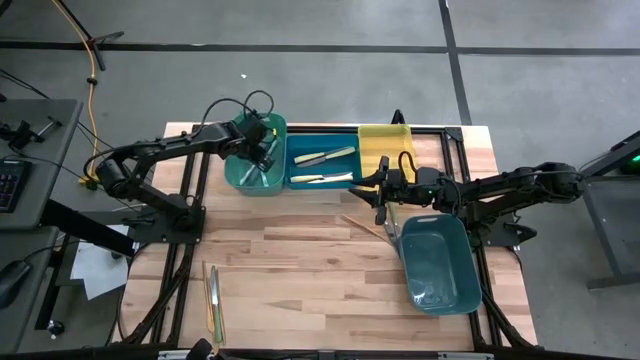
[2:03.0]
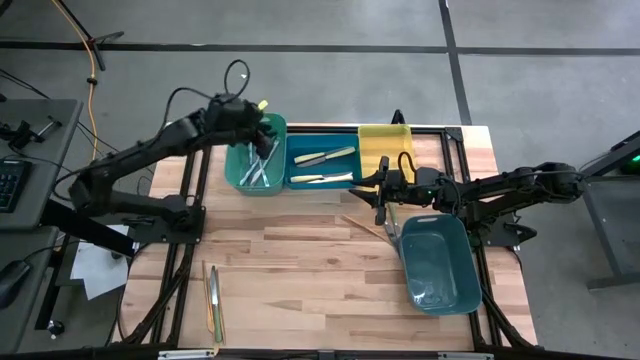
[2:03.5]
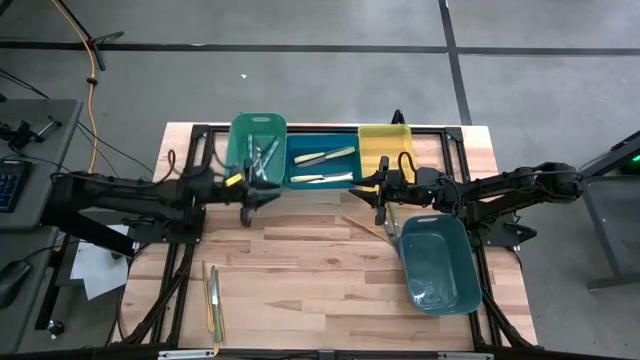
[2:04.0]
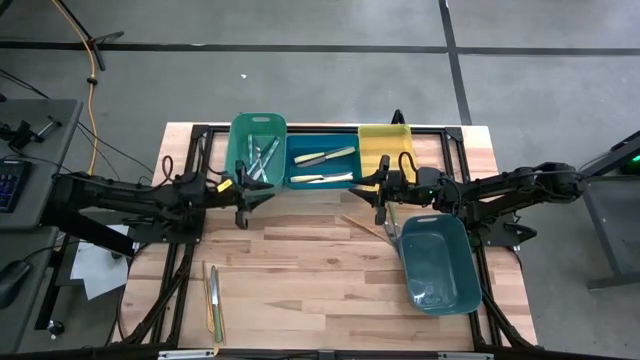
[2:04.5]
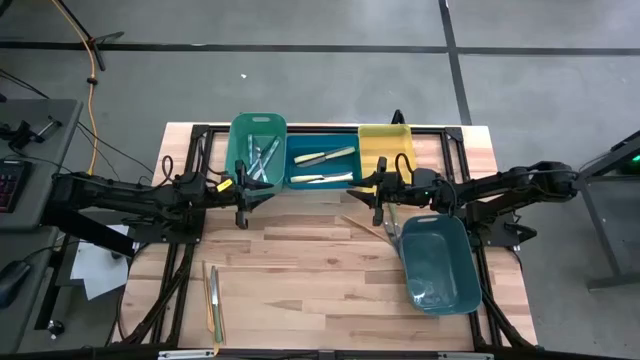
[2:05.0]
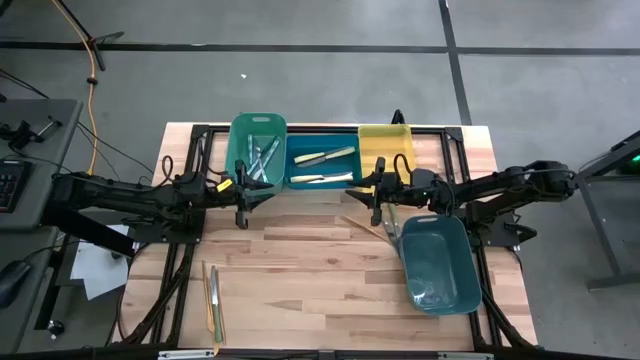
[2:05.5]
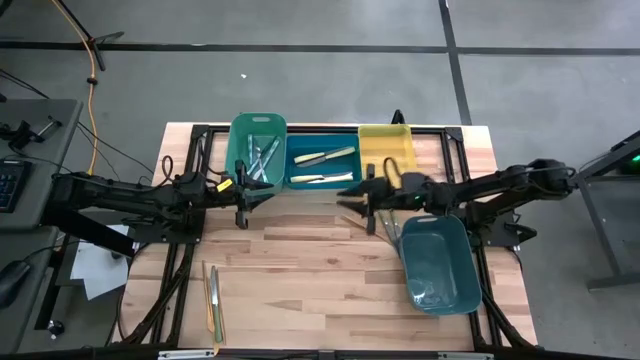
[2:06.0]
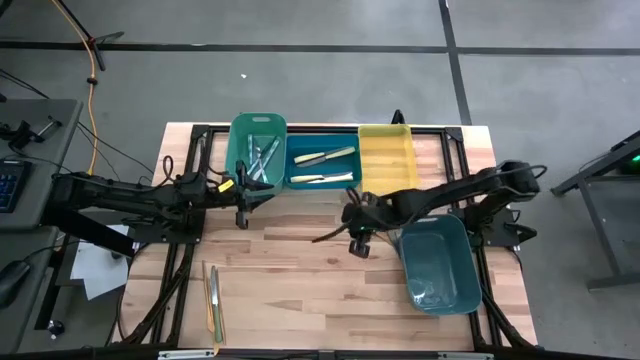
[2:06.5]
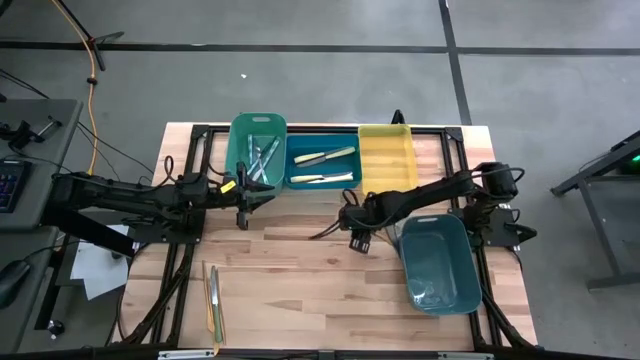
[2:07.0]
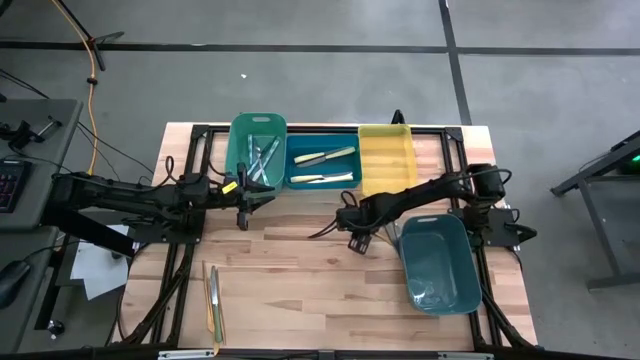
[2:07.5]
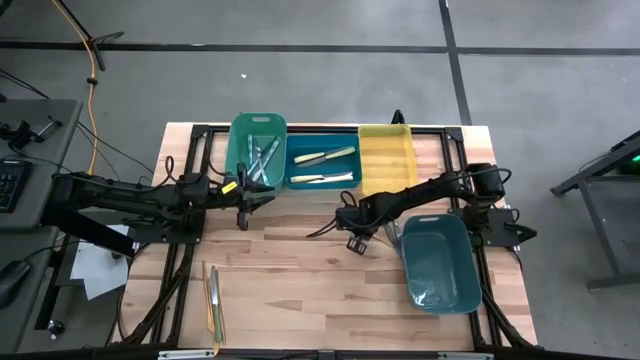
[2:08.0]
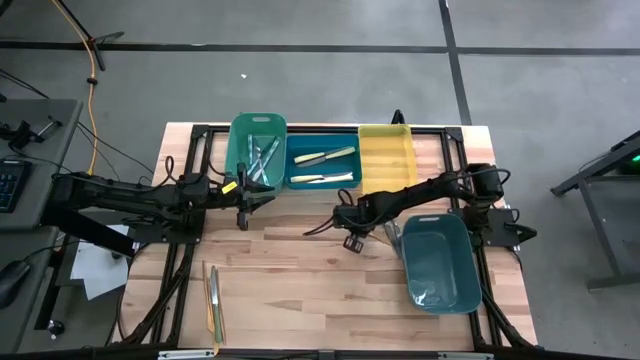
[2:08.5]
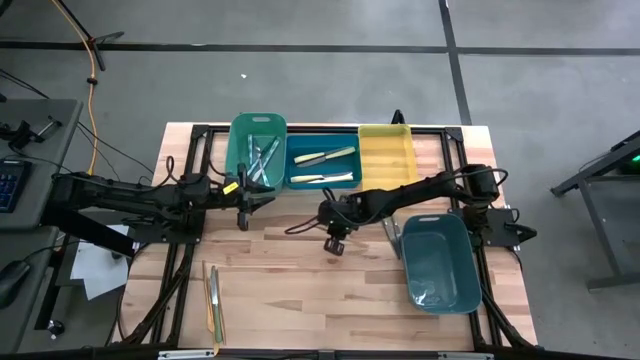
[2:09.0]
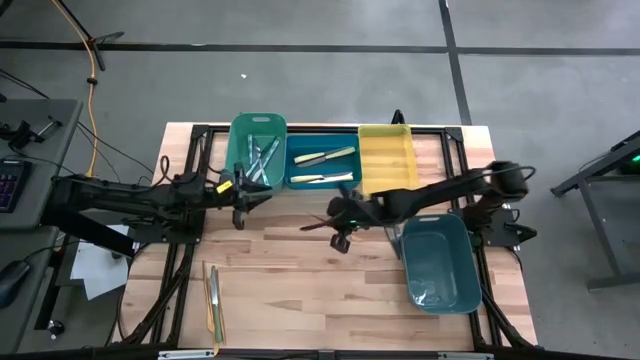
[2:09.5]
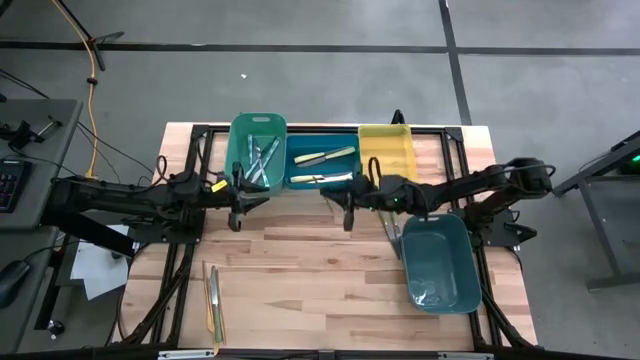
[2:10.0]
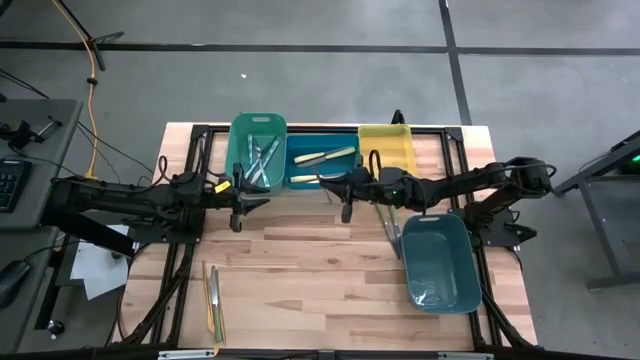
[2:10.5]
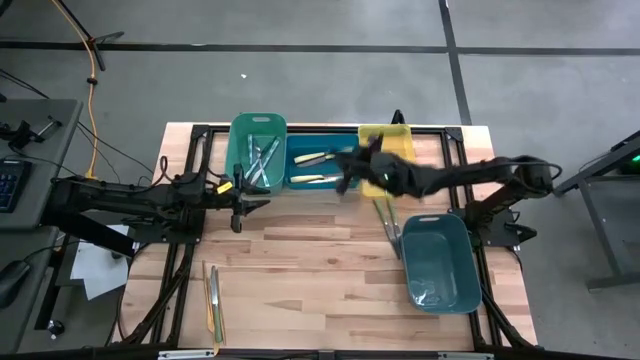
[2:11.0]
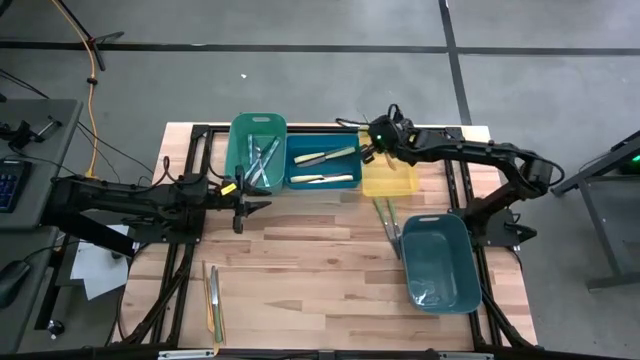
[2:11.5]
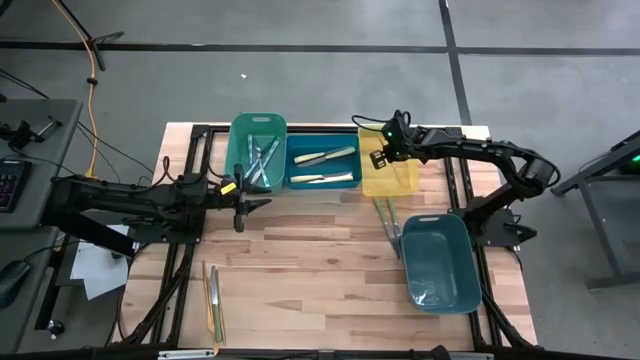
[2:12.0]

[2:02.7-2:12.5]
Task: Sort silverware by color (type)
Put the gold knife into the yellow bin

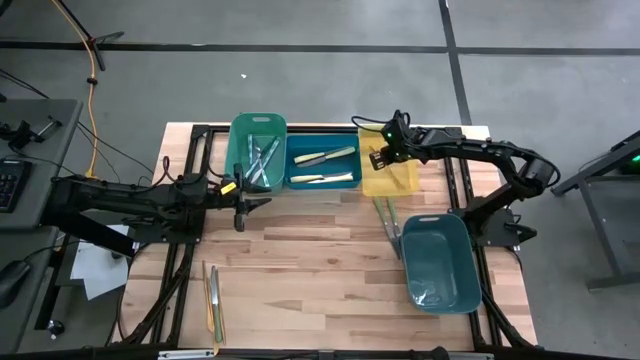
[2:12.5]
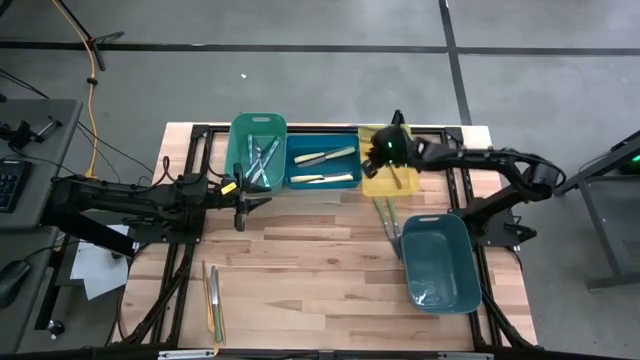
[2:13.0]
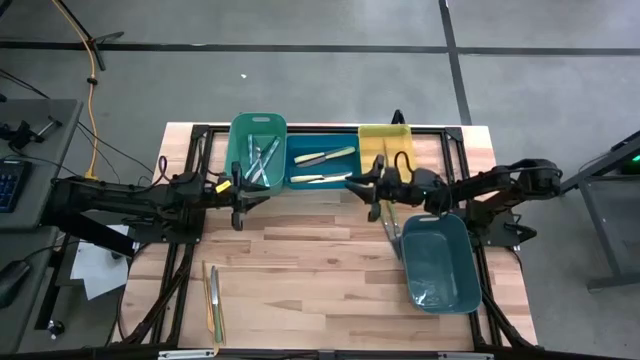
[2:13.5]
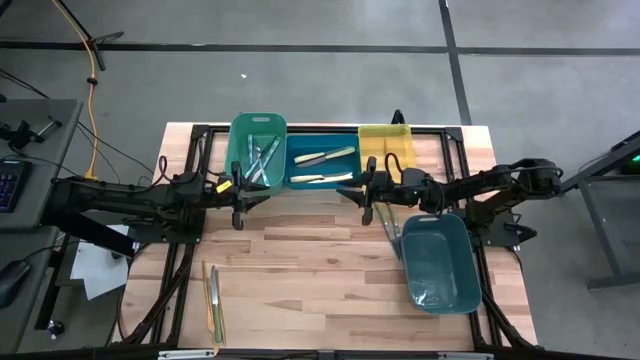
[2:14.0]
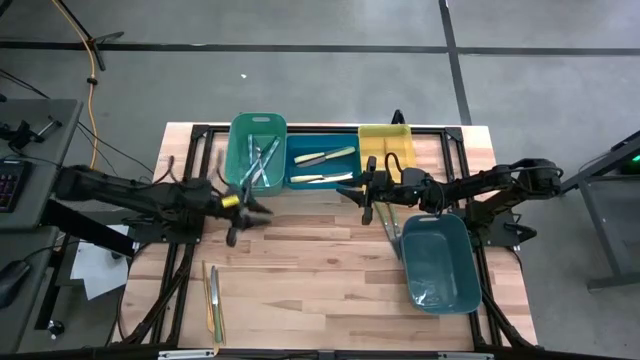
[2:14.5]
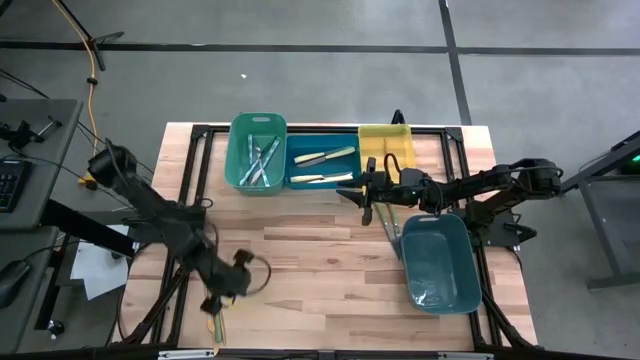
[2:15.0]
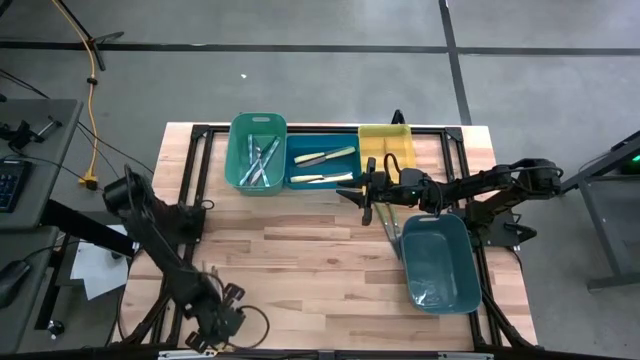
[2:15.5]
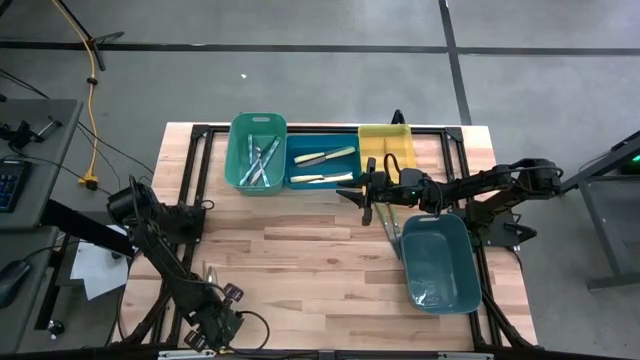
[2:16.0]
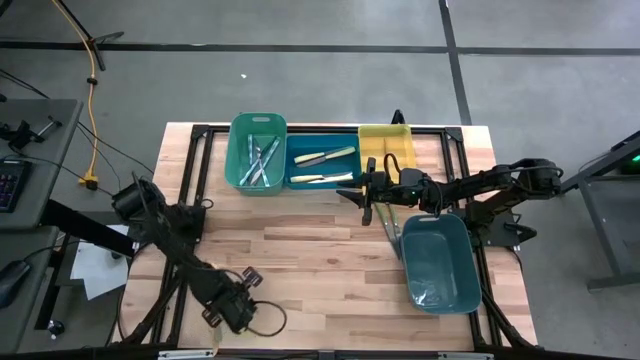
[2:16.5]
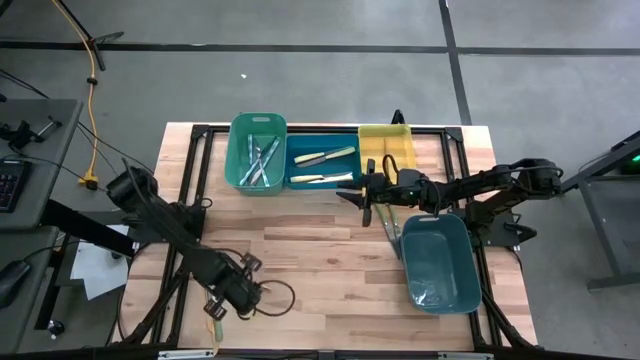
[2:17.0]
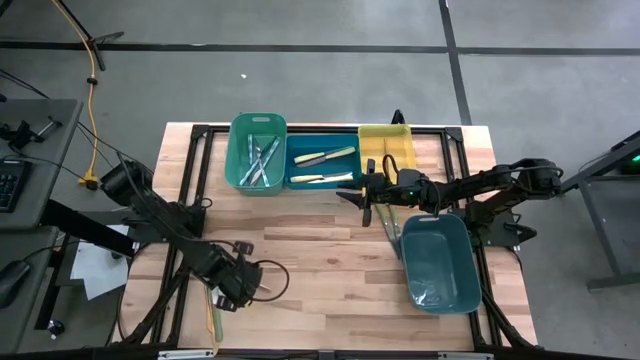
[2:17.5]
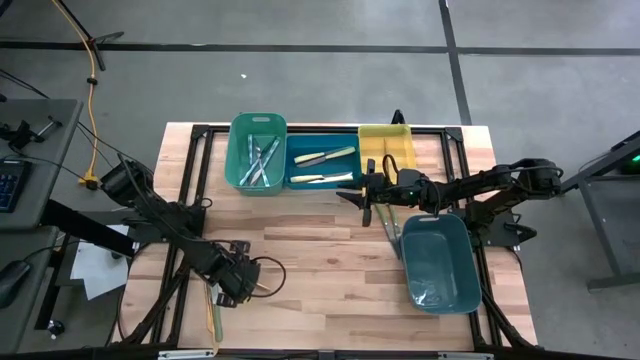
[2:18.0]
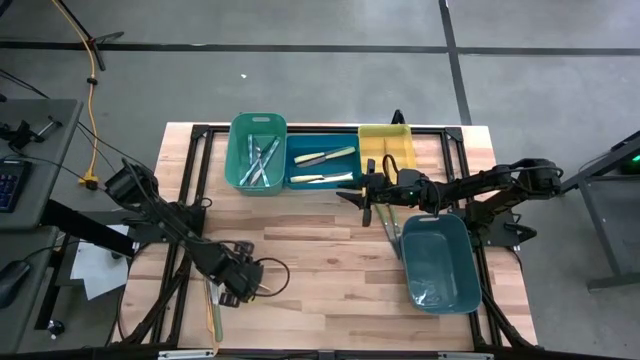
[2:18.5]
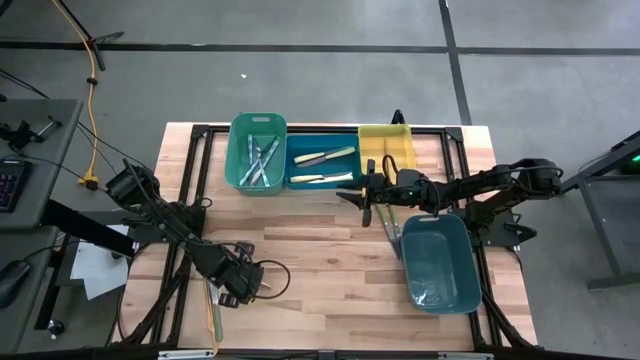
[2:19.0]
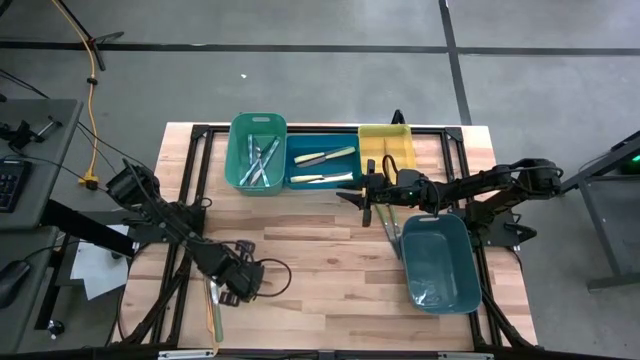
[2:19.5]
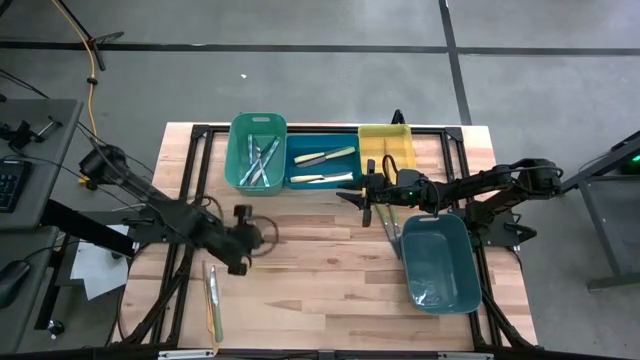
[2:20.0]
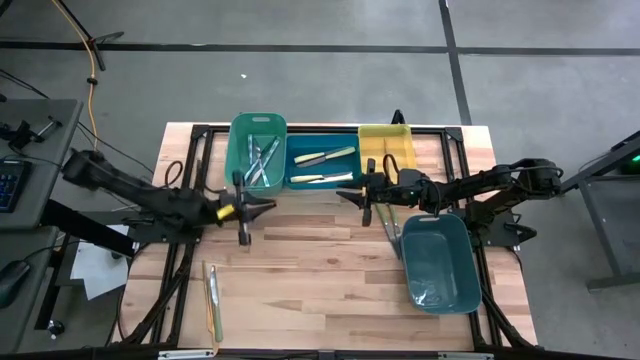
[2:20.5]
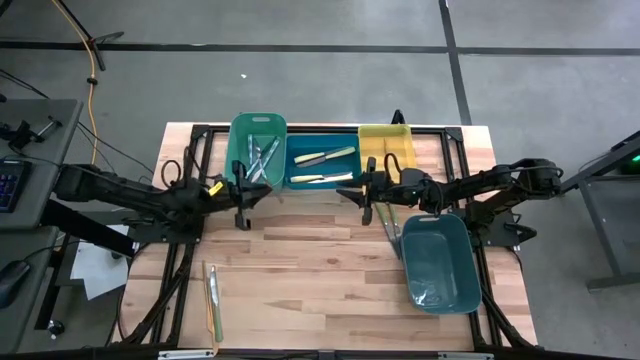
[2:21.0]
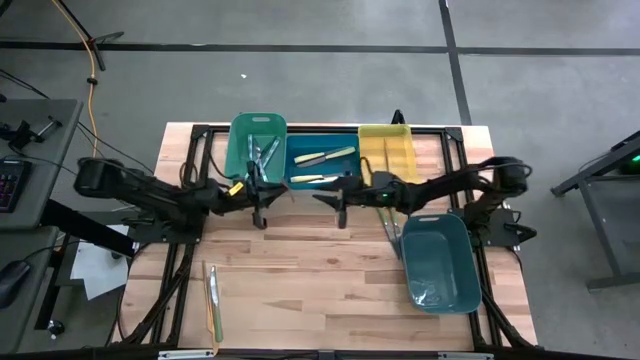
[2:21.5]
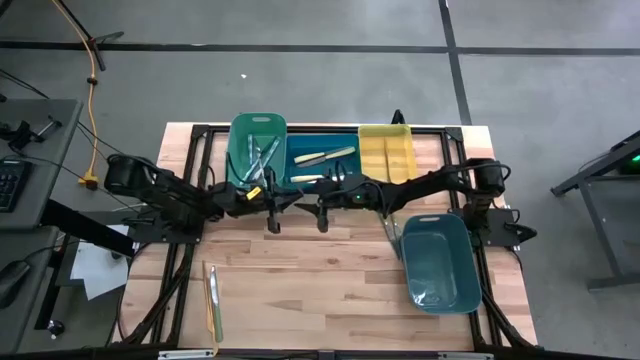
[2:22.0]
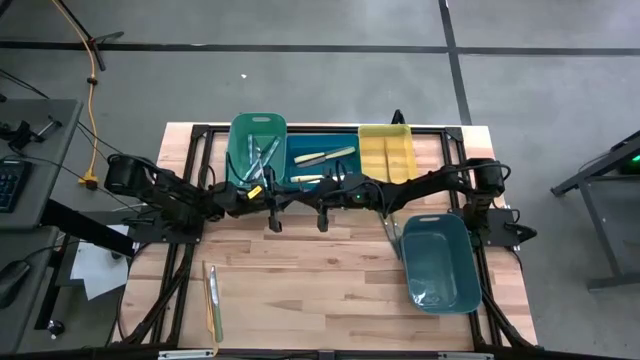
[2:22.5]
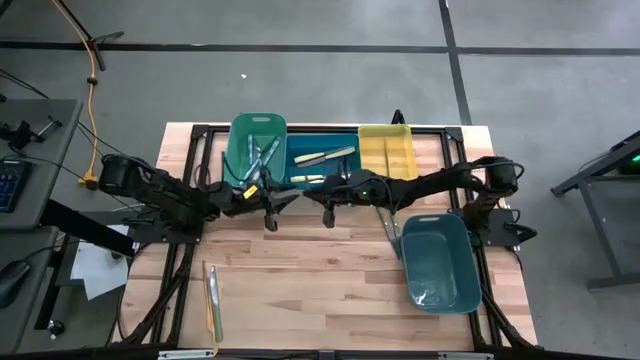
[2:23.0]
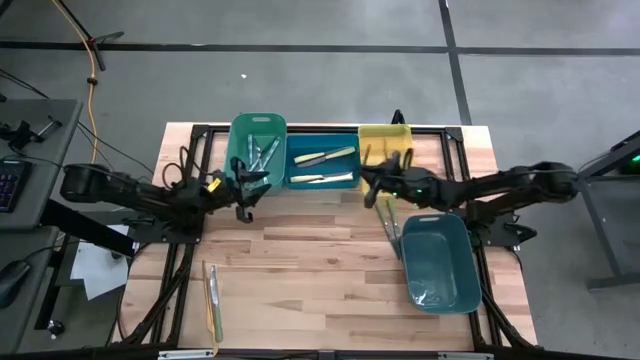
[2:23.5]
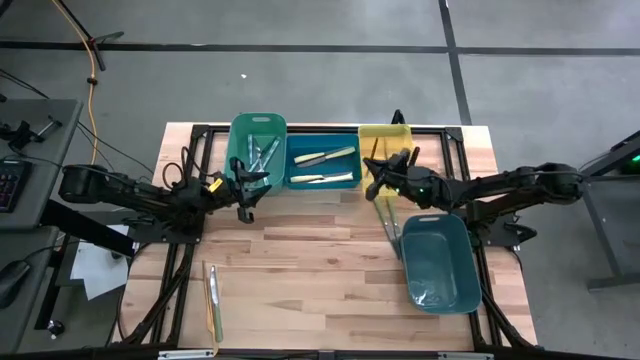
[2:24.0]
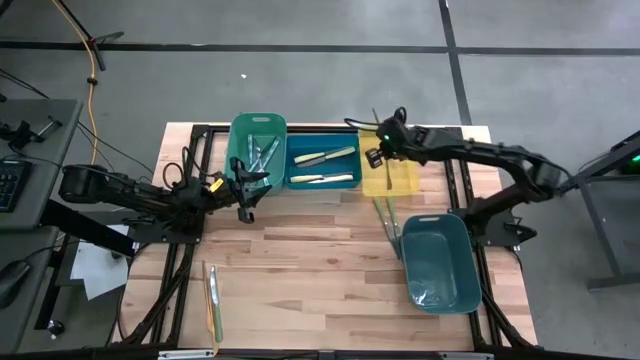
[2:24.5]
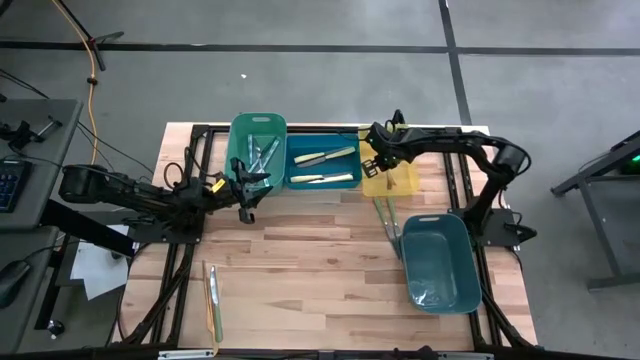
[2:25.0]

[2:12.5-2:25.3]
Put the gold knife into the yellow bin
